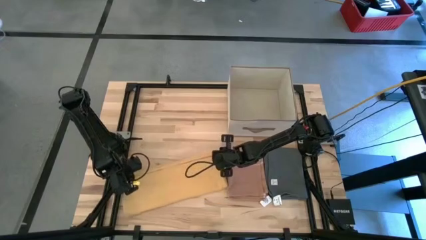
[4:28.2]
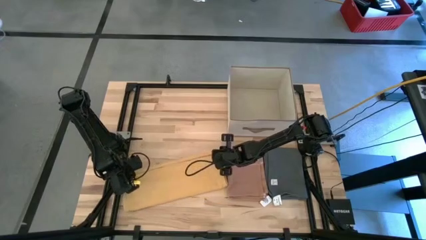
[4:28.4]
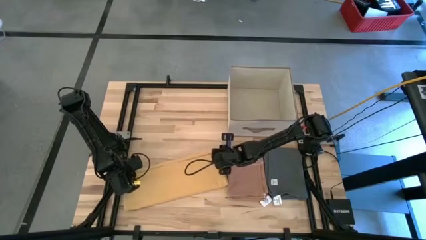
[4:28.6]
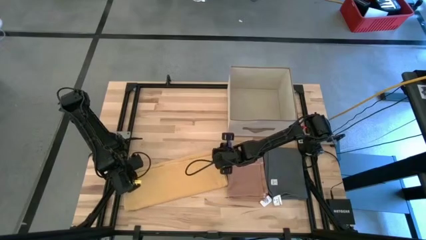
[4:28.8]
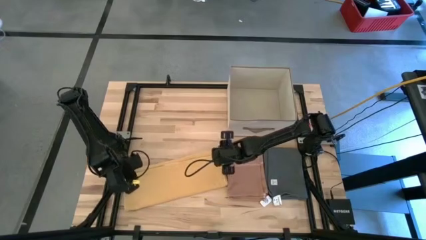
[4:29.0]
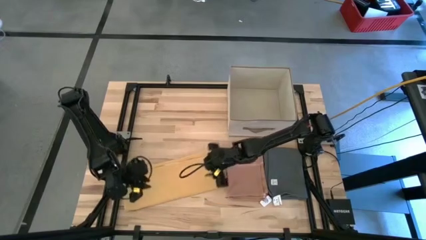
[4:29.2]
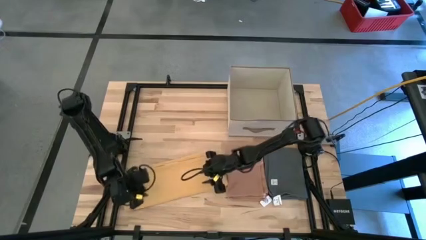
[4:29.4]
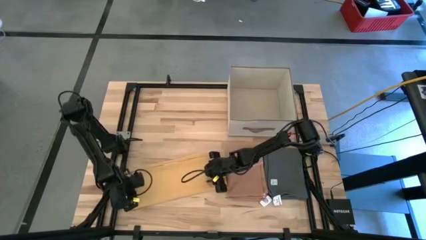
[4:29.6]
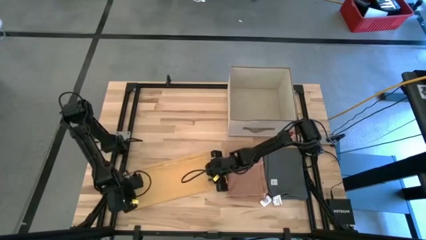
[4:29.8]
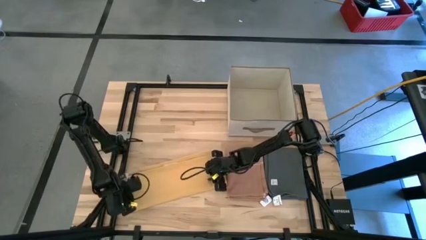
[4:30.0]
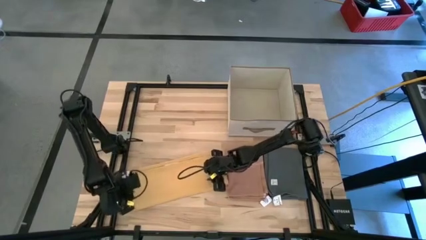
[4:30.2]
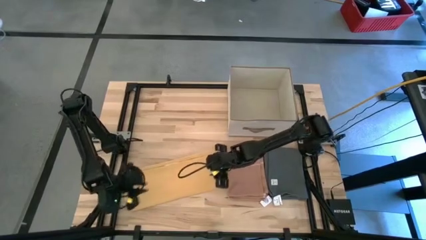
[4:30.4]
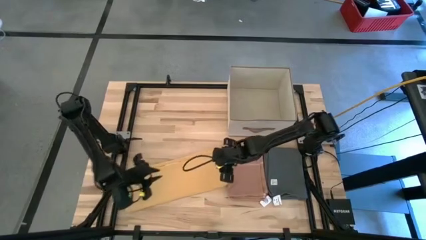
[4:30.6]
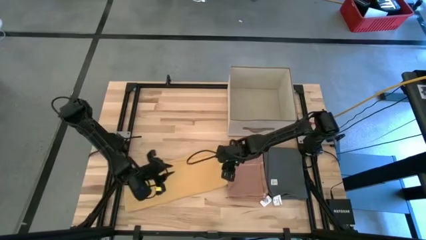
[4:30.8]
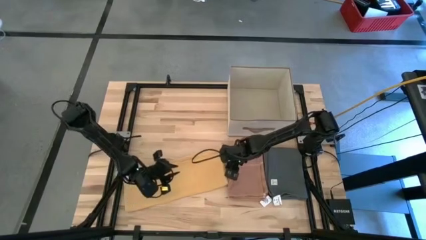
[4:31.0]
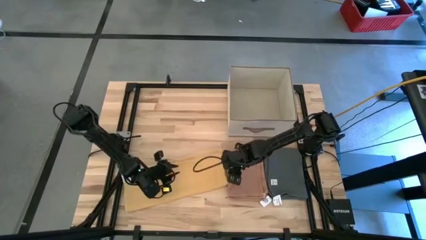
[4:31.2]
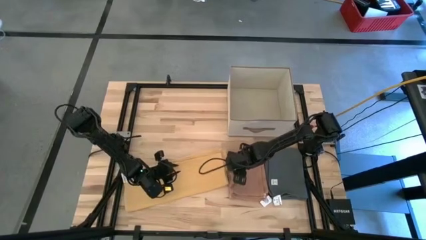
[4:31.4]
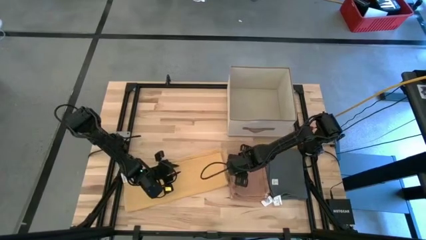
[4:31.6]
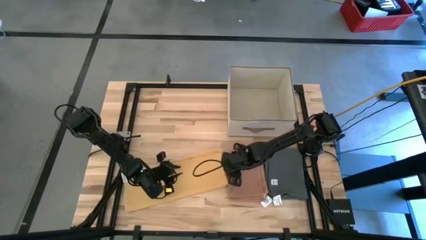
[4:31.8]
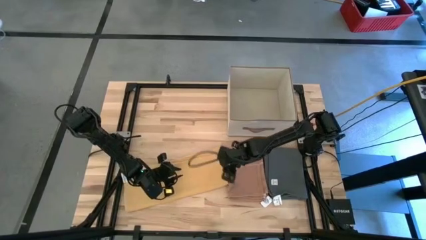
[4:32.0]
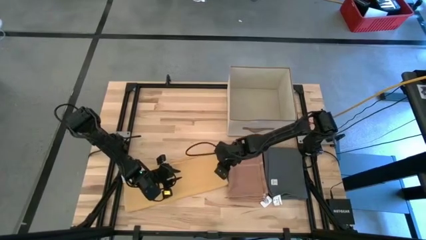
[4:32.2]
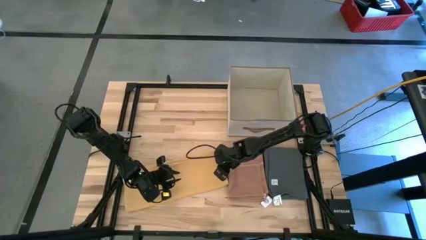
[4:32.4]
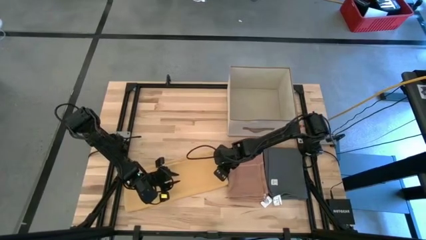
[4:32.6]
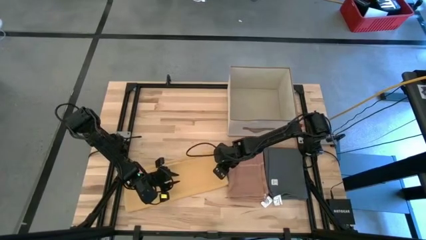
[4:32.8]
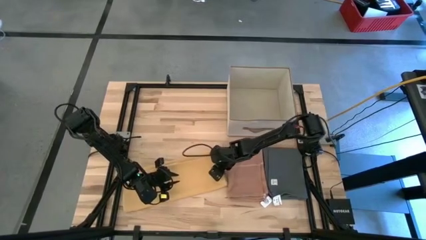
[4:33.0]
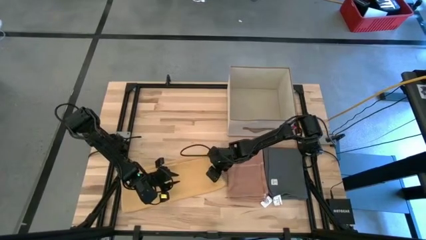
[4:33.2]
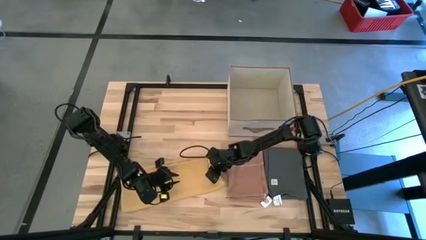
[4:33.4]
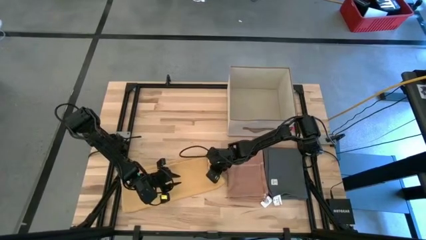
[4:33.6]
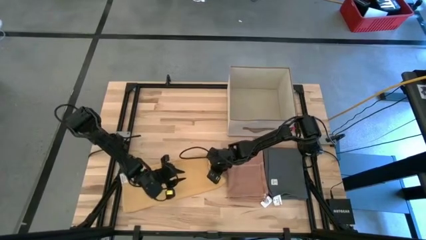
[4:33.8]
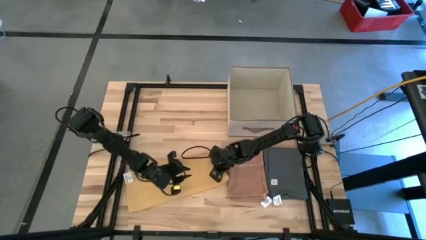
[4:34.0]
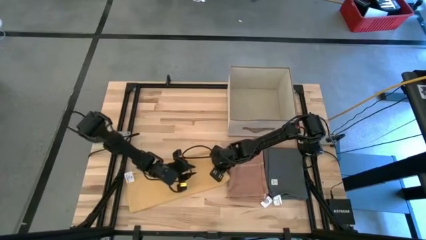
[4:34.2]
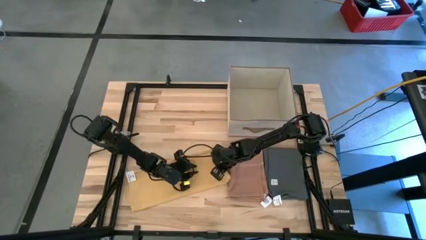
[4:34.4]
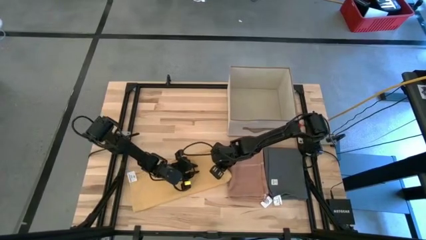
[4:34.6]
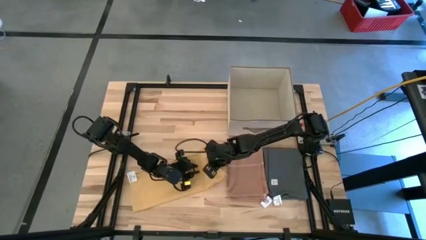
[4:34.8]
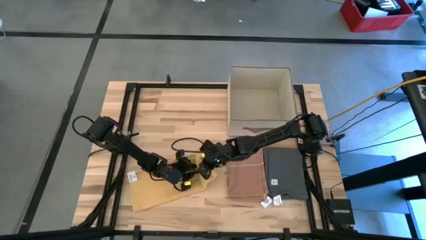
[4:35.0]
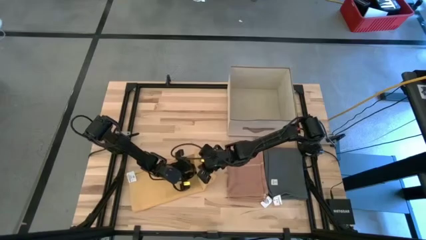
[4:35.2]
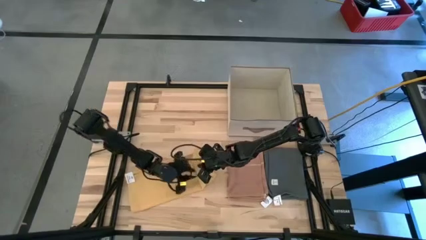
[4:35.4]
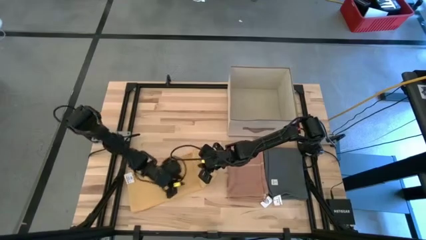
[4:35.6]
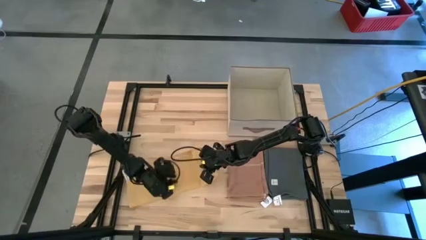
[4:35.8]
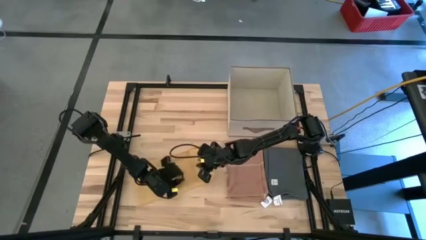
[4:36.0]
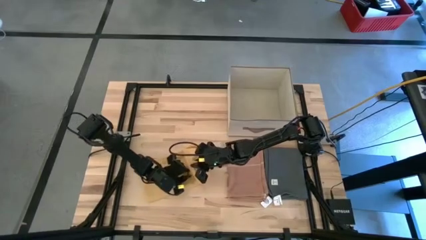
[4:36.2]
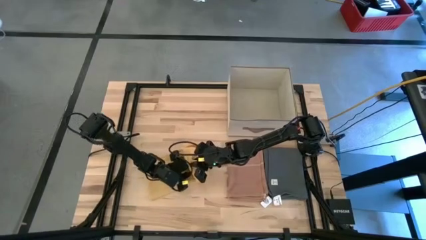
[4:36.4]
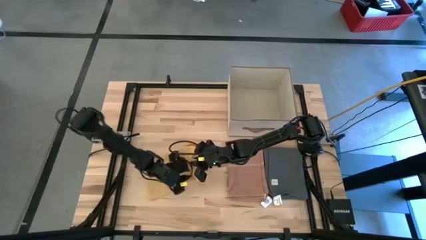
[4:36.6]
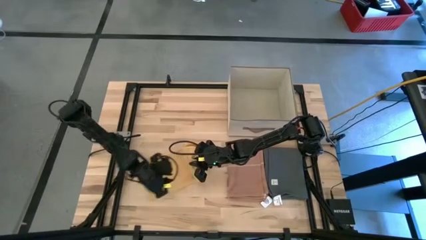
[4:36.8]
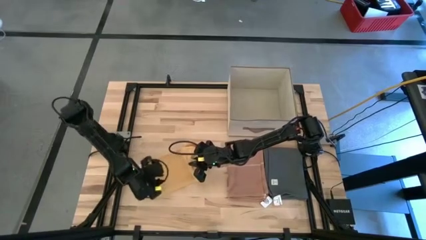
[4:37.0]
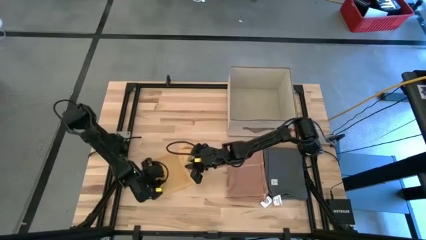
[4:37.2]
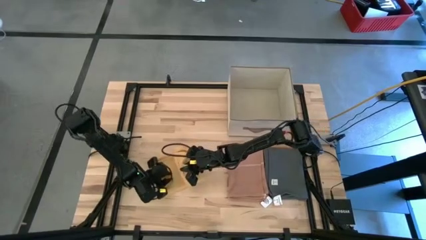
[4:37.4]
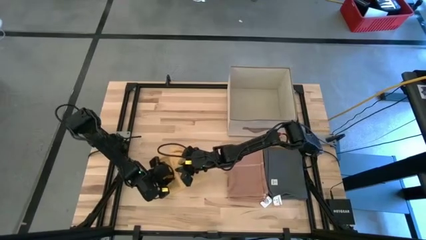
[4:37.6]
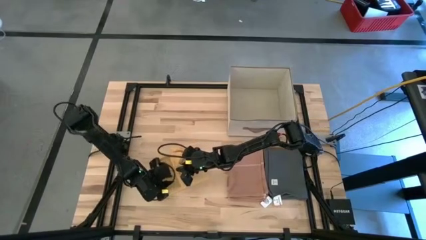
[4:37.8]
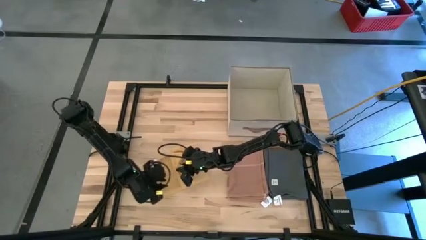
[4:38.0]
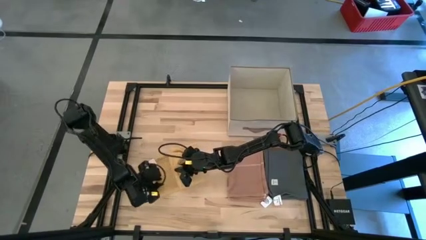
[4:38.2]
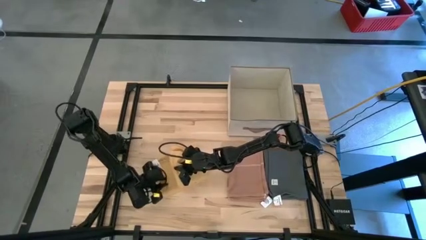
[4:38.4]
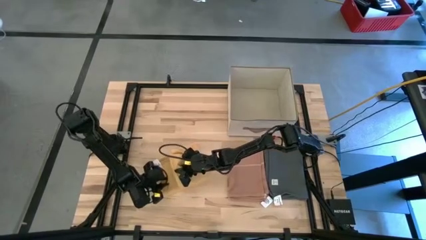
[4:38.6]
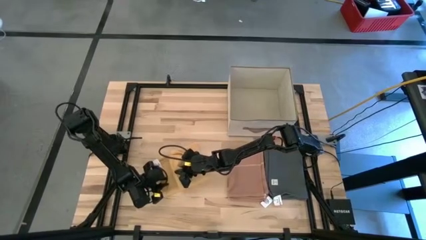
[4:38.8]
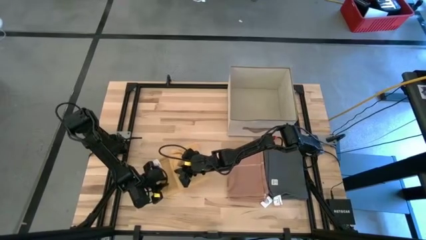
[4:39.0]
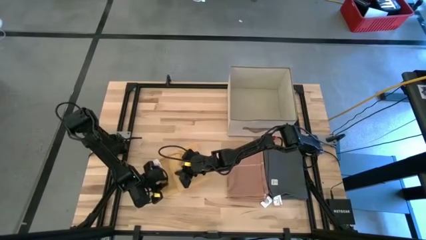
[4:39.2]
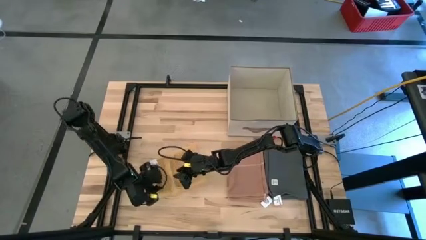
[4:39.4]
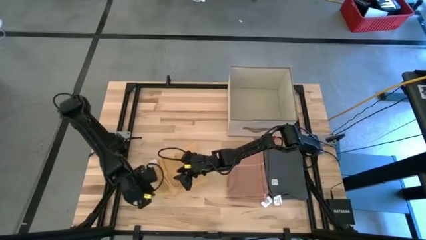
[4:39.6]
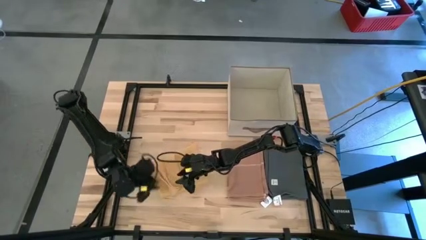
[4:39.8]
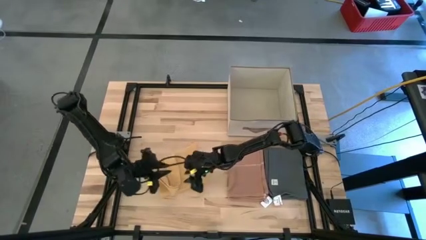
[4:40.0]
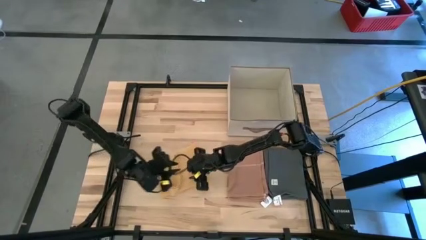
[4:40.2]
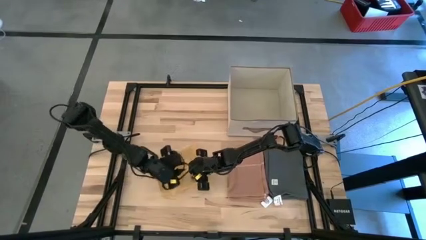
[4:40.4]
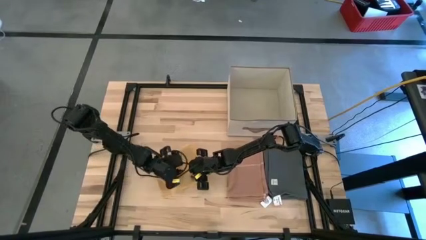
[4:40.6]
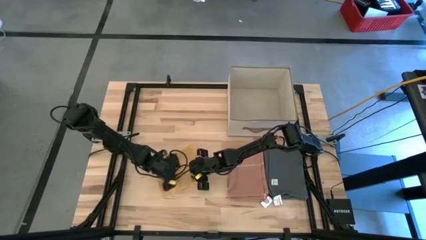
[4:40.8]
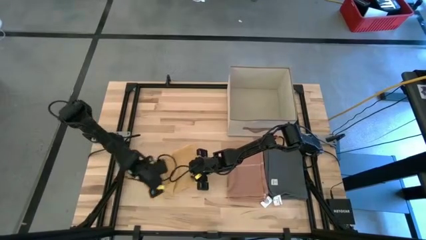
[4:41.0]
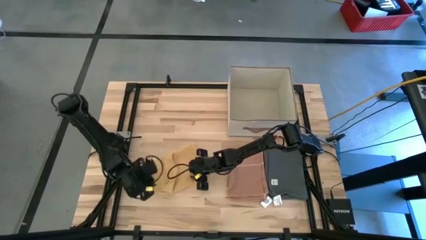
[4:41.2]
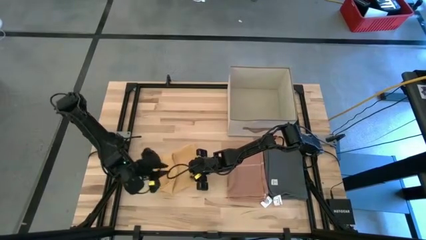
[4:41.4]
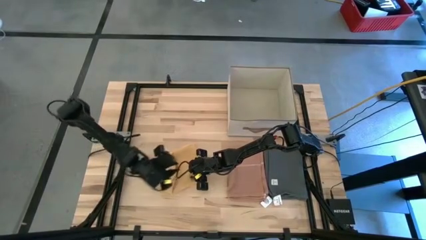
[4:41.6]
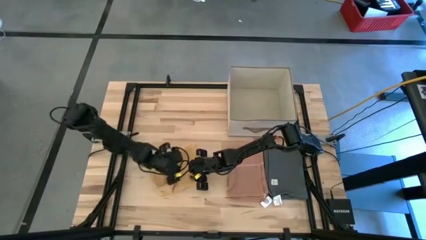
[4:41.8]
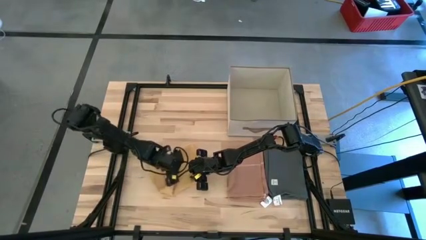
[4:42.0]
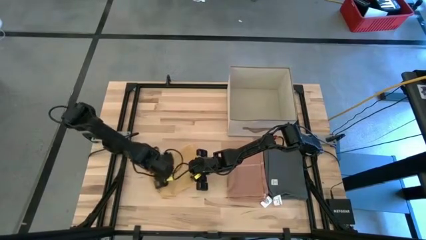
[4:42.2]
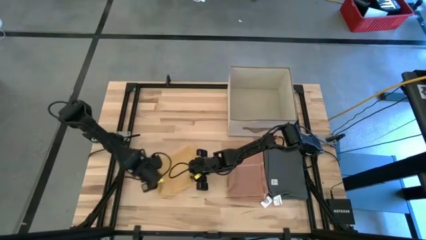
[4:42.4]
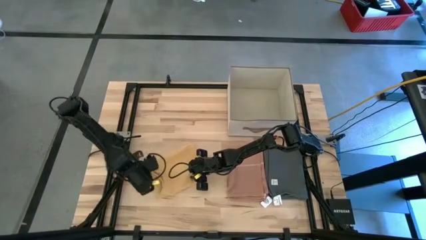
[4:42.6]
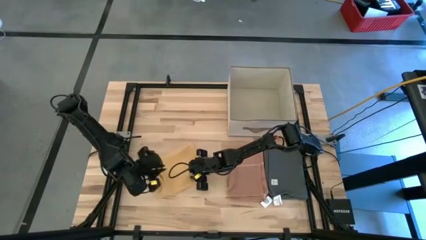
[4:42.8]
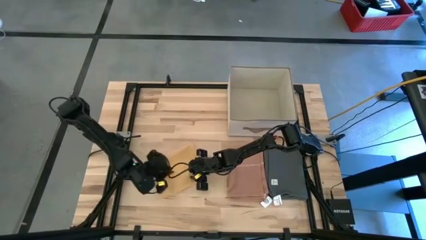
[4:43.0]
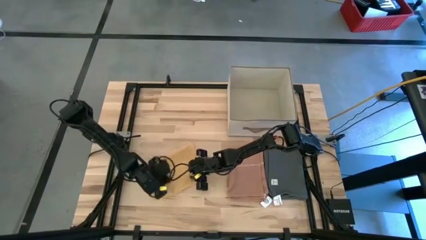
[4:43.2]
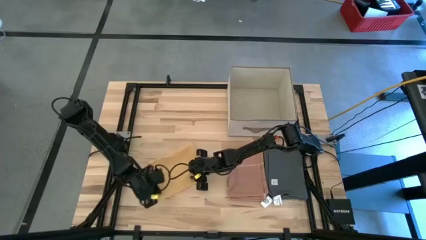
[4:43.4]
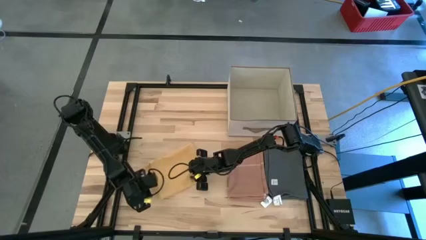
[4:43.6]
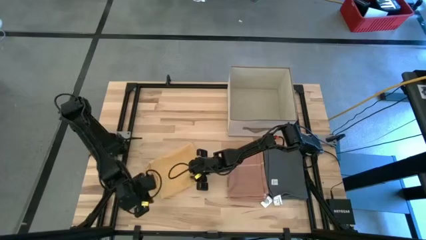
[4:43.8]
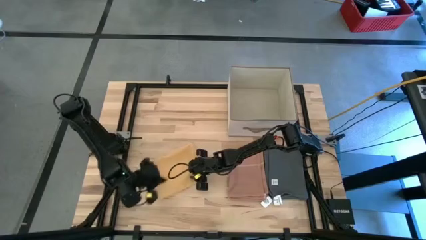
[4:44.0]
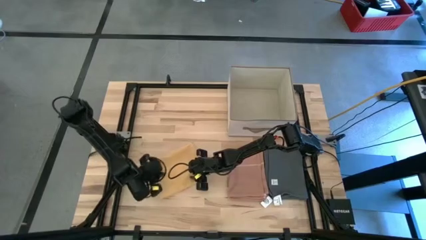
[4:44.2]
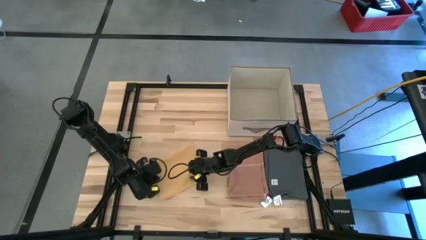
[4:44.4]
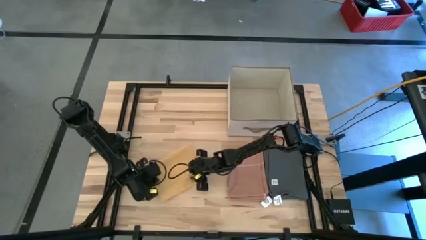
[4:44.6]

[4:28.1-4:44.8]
Task: Fold towel
Fold the yellow towel
